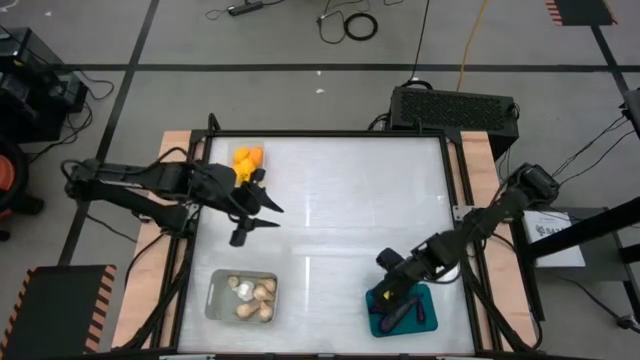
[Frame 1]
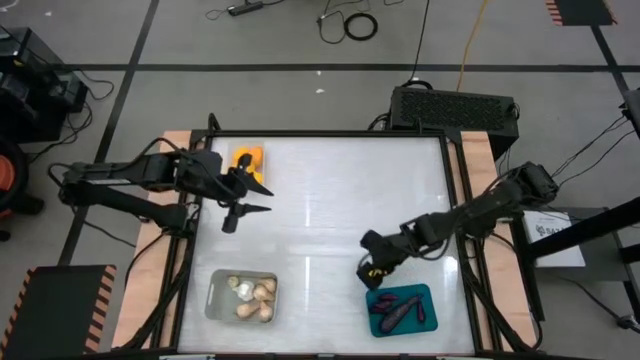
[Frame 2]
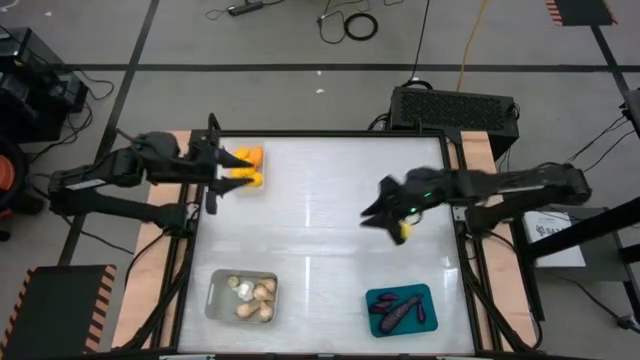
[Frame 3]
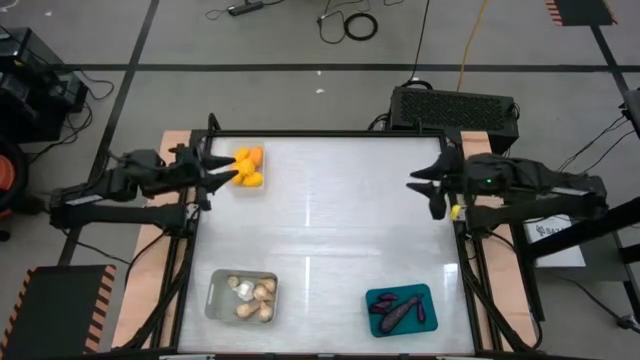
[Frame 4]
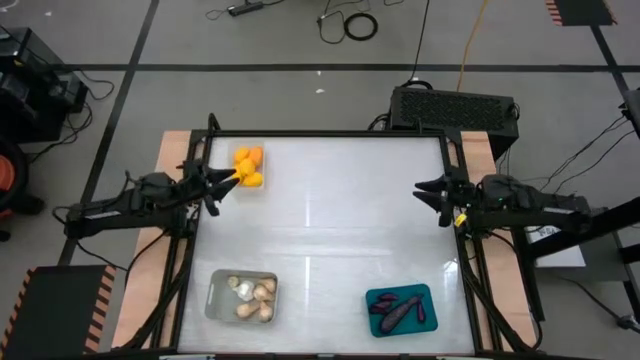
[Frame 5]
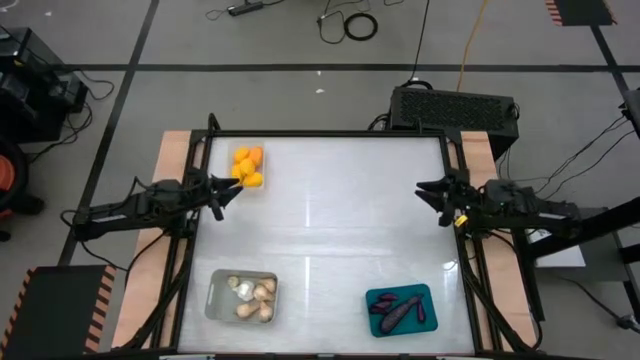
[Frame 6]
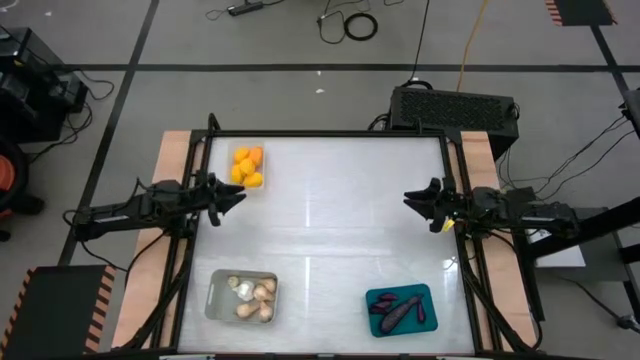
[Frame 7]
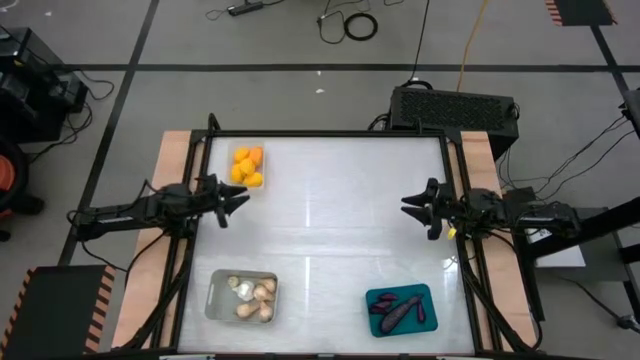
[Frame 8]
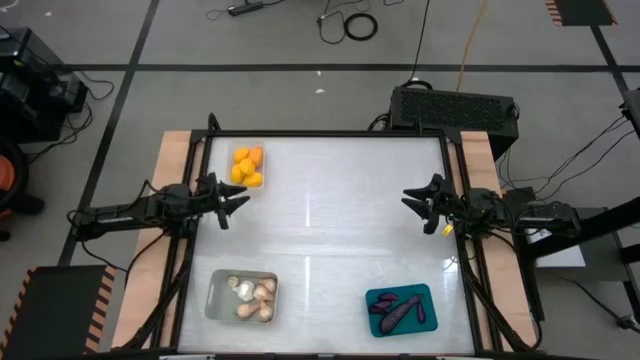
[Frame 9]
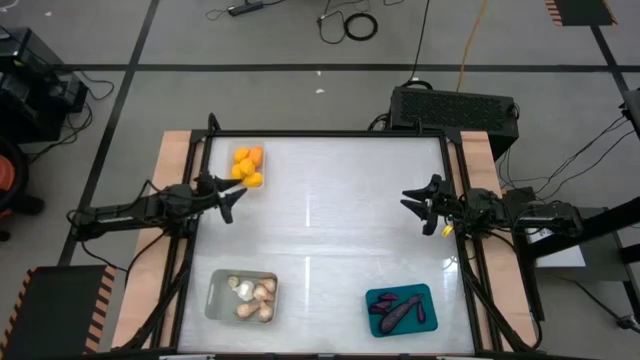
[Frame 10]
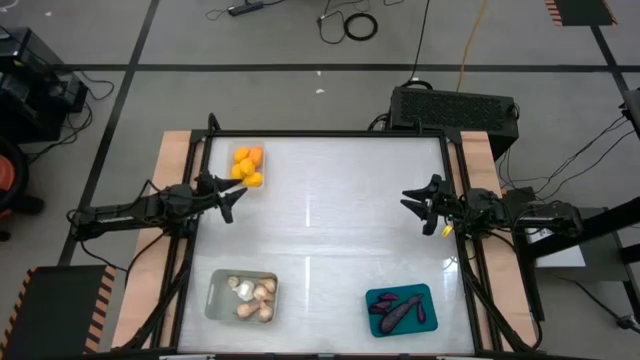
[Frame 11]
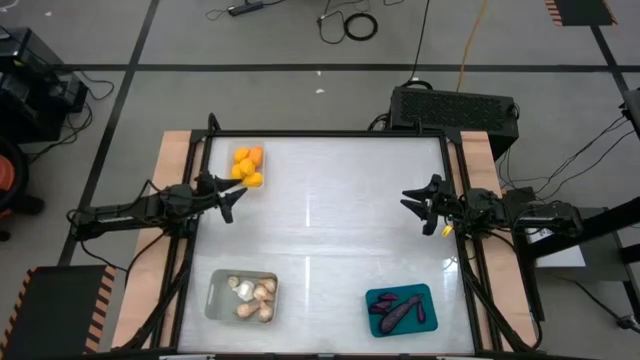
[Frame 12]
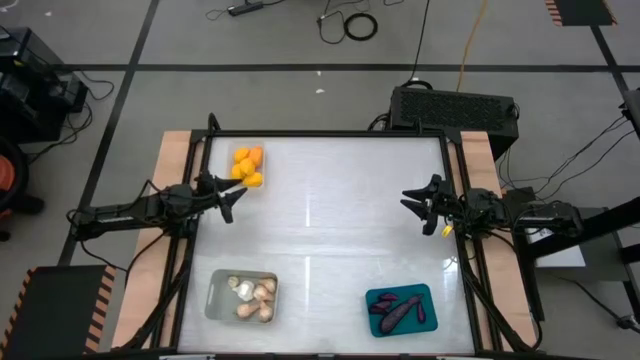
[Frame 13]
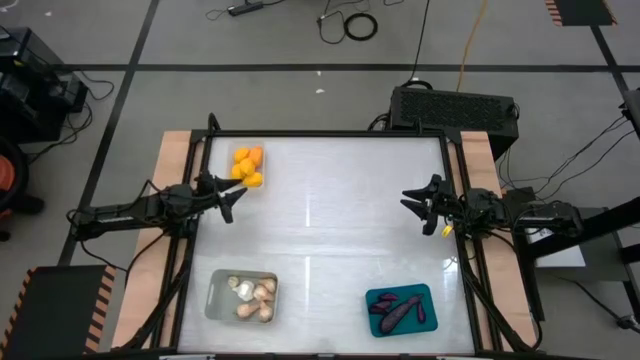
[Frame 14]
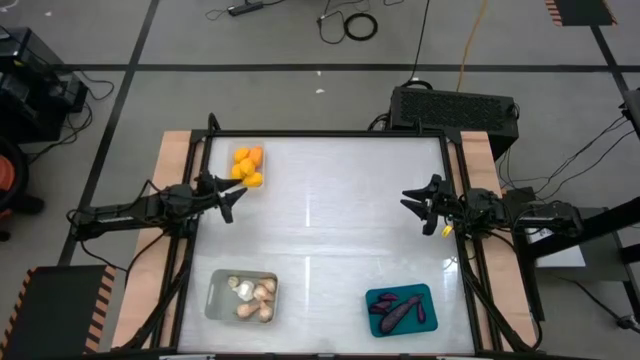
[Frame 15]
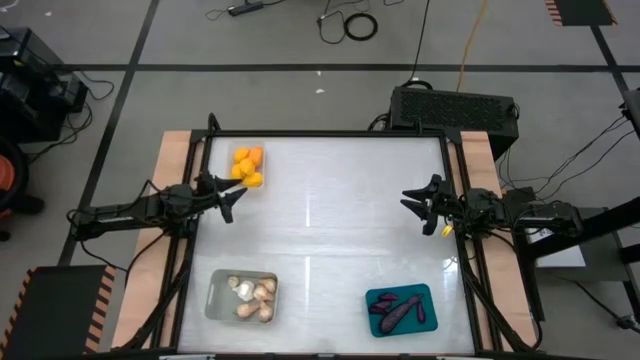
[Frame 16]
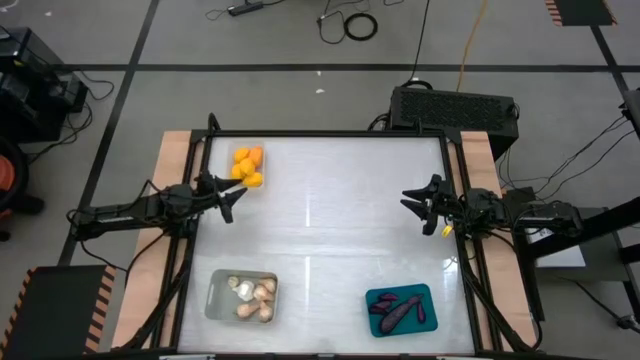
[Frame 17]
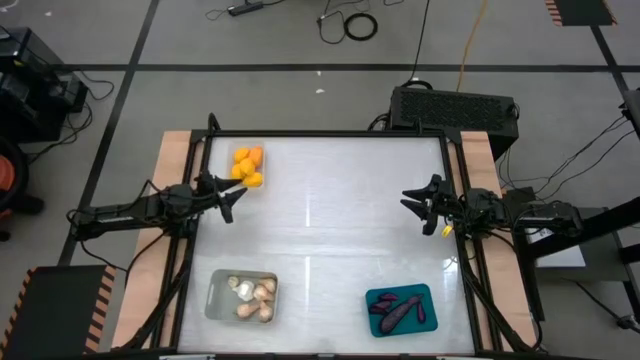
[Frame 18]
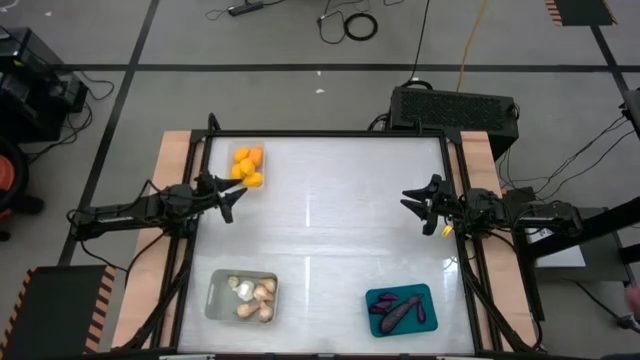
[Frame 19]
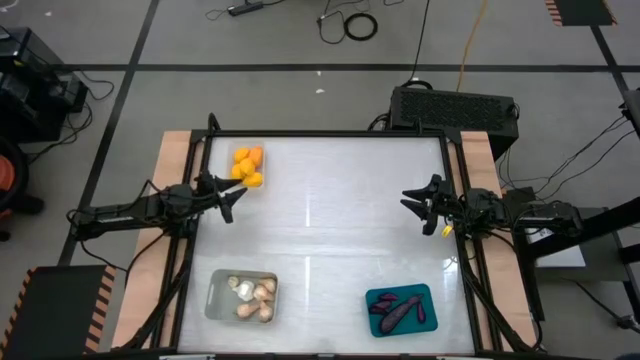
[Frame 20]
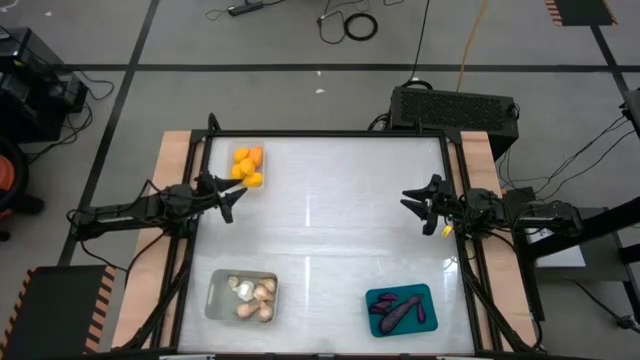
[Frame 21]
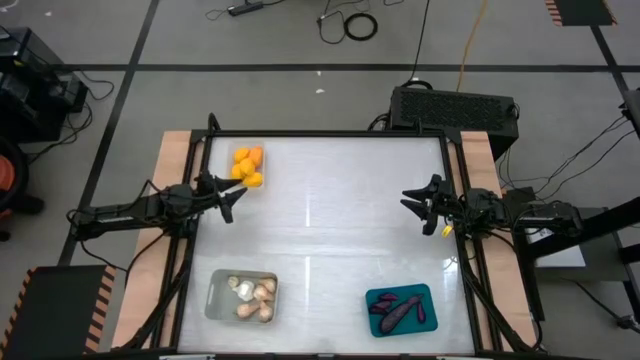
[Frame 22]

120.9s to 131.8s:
Task: Sort produce into baskets
Return to Home Position
